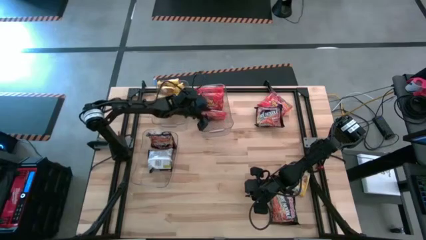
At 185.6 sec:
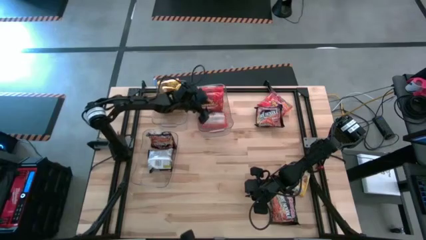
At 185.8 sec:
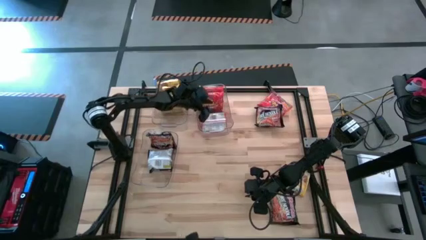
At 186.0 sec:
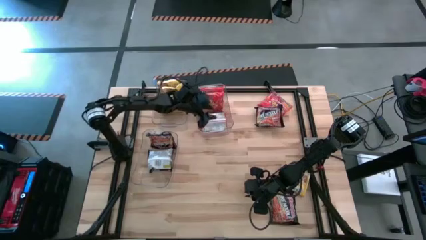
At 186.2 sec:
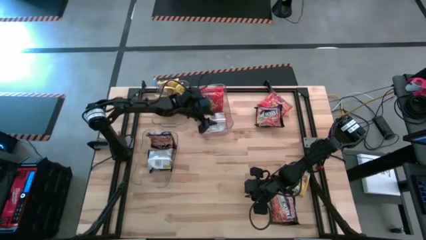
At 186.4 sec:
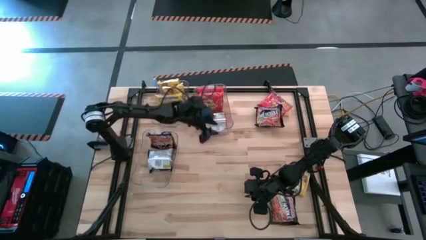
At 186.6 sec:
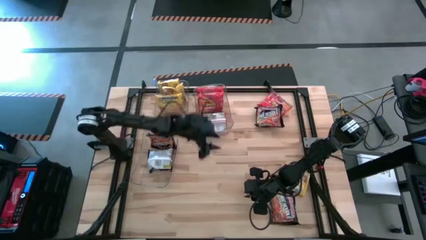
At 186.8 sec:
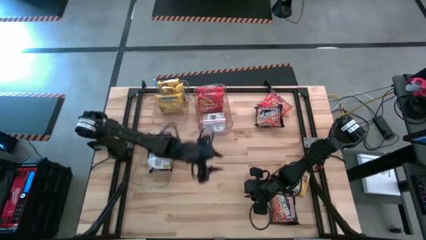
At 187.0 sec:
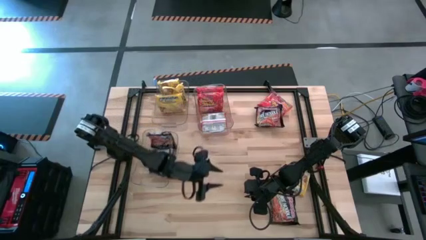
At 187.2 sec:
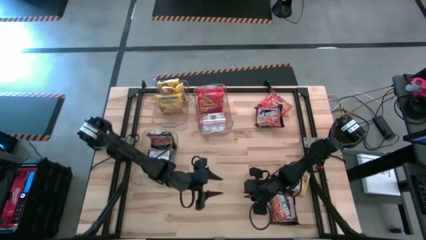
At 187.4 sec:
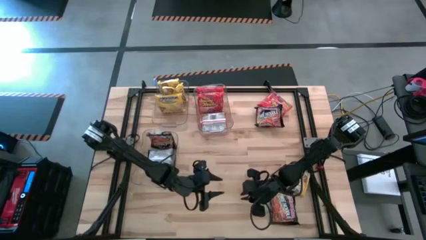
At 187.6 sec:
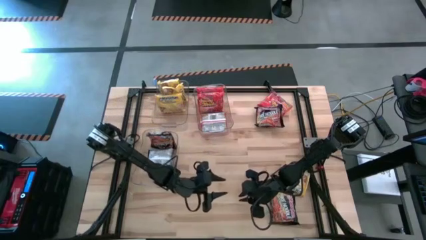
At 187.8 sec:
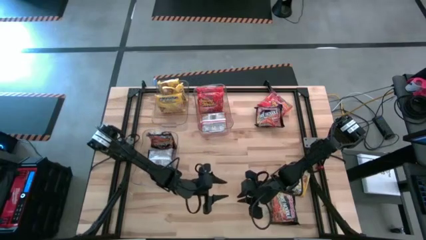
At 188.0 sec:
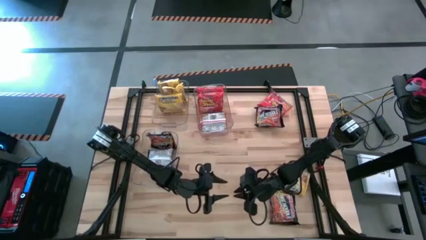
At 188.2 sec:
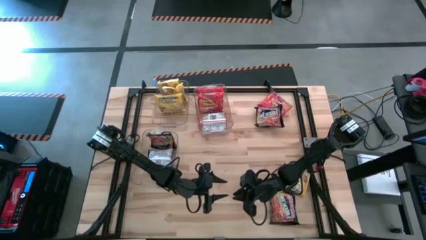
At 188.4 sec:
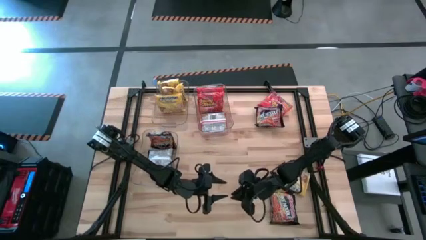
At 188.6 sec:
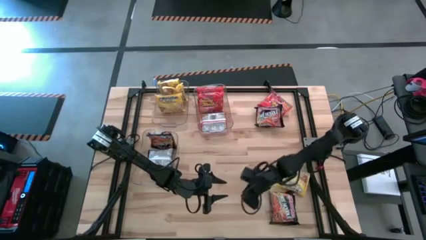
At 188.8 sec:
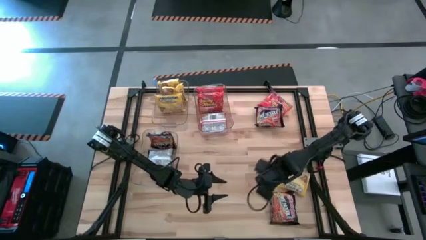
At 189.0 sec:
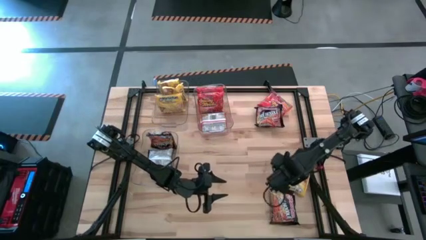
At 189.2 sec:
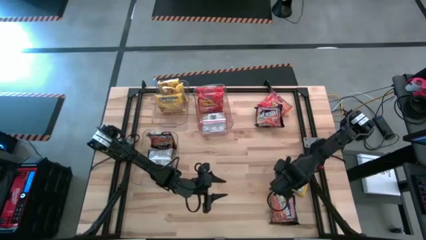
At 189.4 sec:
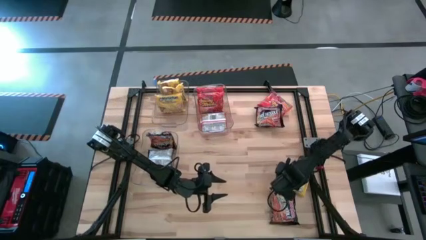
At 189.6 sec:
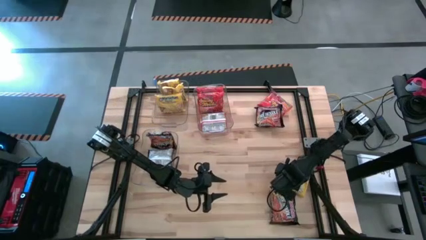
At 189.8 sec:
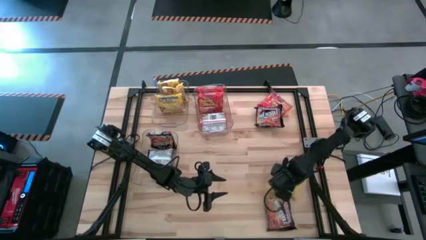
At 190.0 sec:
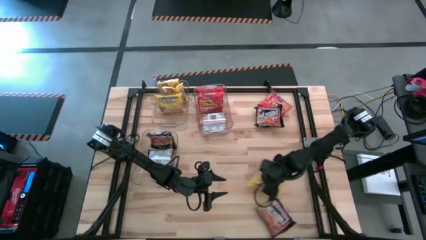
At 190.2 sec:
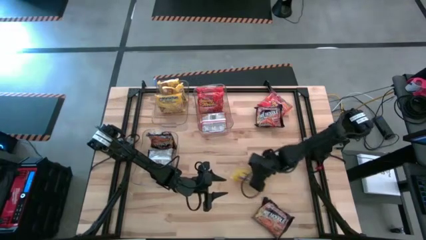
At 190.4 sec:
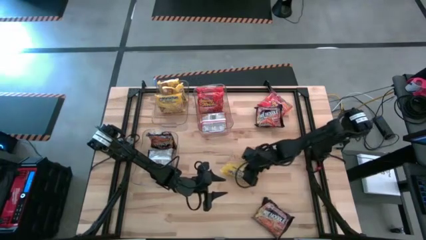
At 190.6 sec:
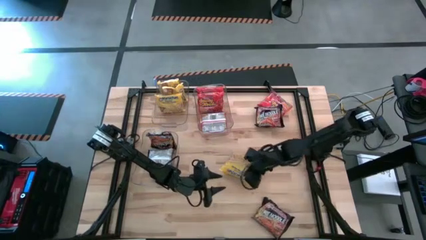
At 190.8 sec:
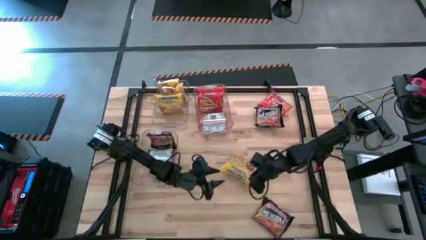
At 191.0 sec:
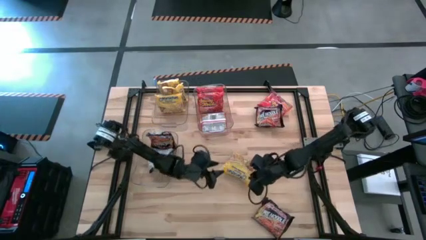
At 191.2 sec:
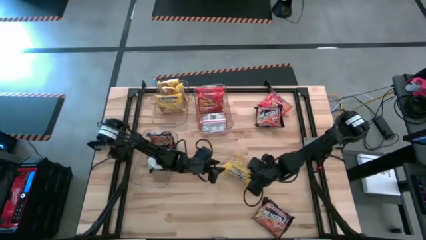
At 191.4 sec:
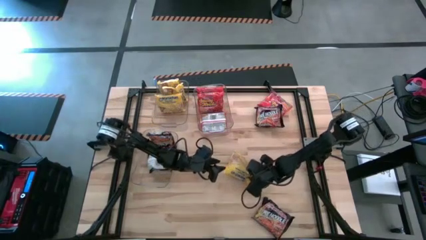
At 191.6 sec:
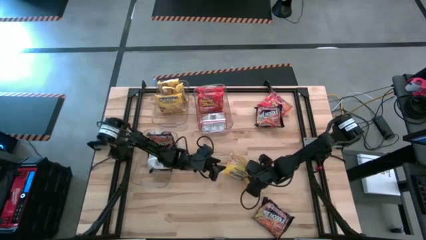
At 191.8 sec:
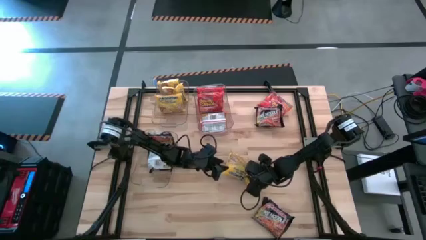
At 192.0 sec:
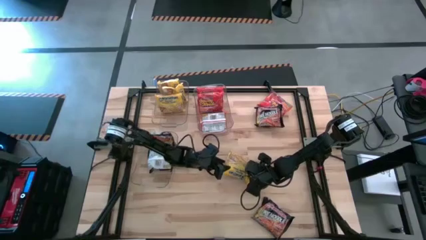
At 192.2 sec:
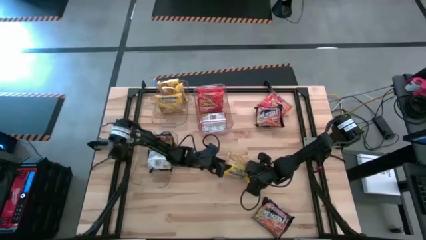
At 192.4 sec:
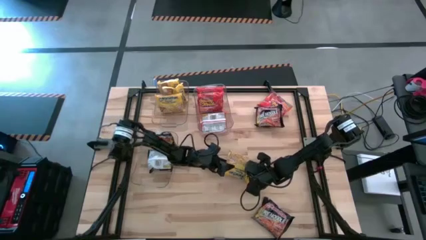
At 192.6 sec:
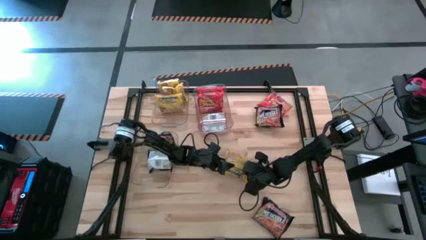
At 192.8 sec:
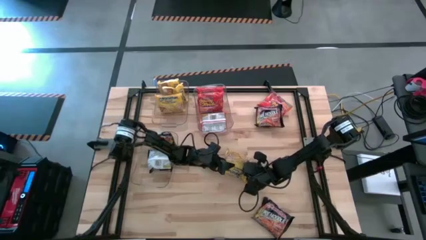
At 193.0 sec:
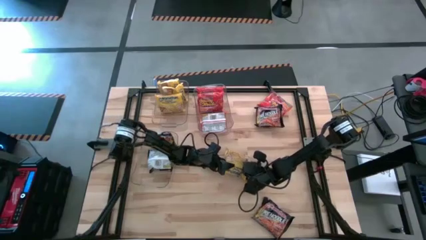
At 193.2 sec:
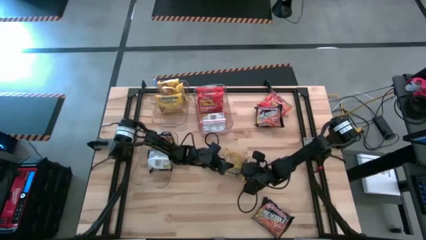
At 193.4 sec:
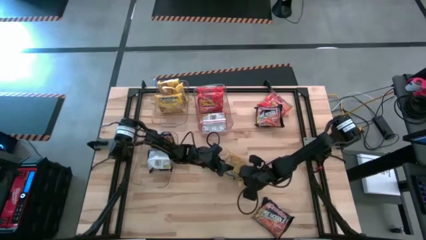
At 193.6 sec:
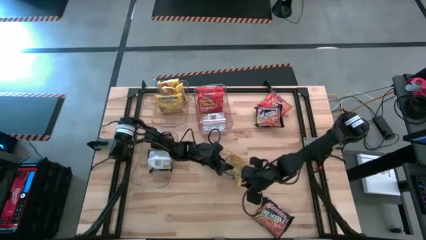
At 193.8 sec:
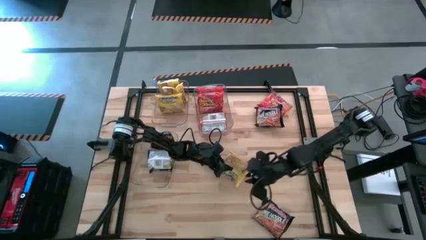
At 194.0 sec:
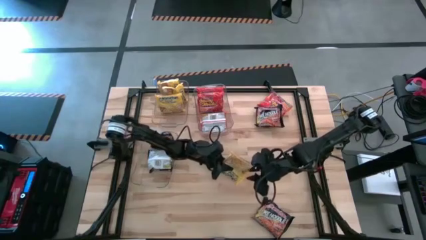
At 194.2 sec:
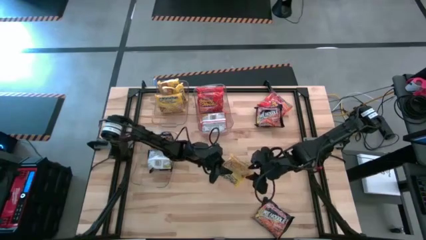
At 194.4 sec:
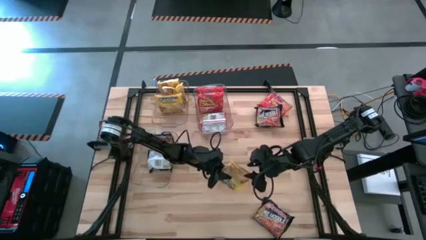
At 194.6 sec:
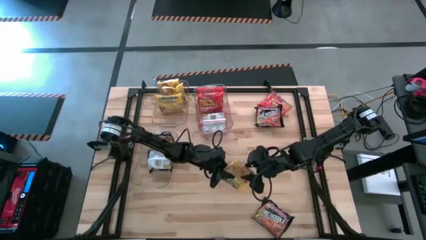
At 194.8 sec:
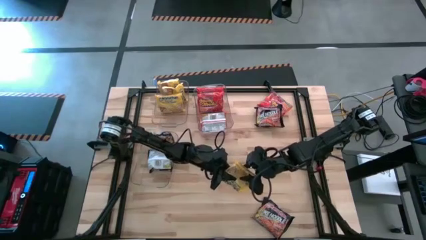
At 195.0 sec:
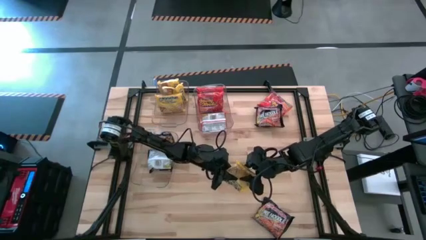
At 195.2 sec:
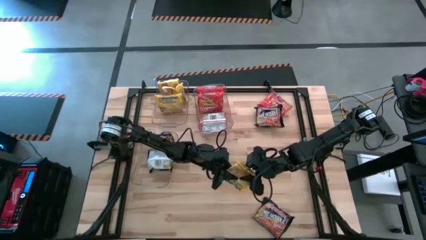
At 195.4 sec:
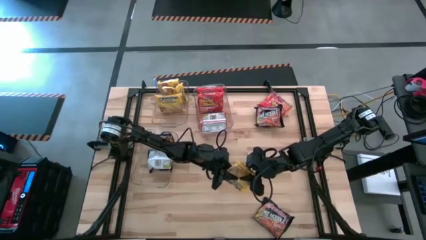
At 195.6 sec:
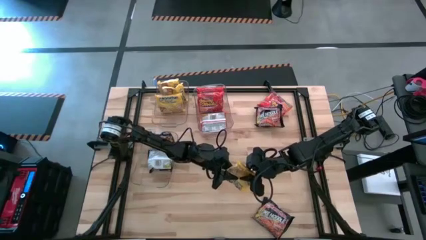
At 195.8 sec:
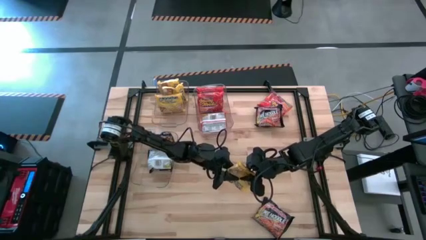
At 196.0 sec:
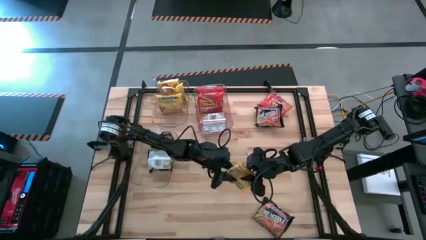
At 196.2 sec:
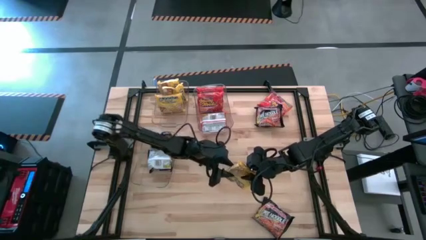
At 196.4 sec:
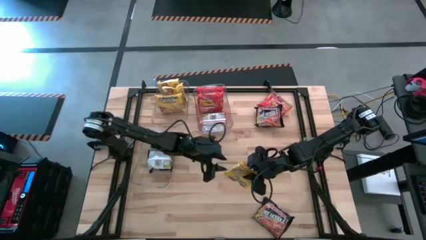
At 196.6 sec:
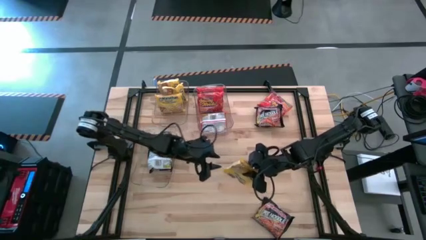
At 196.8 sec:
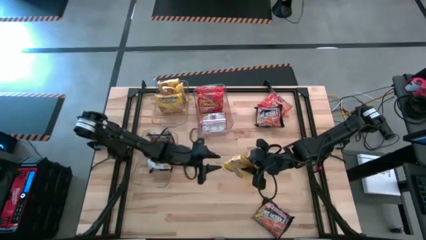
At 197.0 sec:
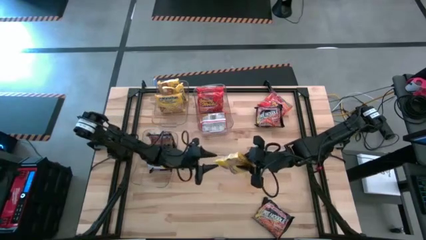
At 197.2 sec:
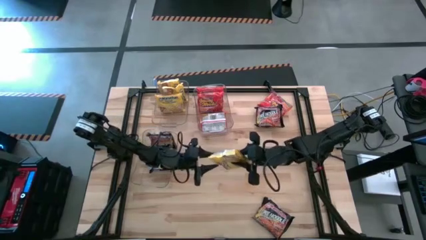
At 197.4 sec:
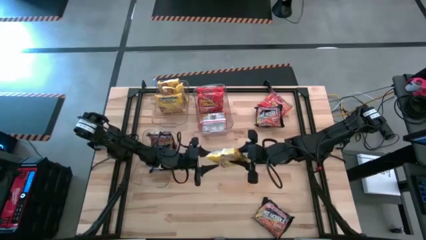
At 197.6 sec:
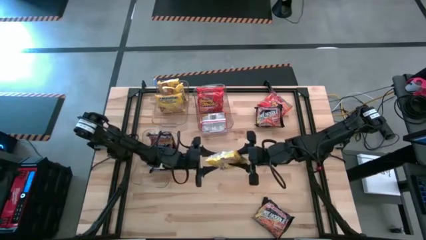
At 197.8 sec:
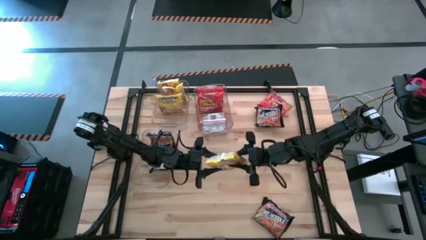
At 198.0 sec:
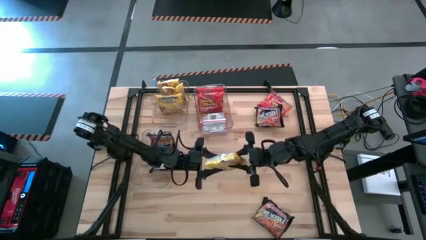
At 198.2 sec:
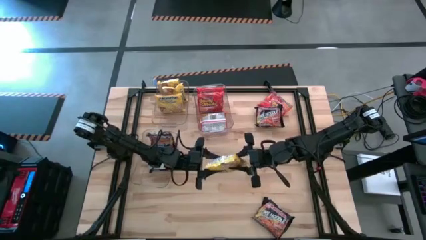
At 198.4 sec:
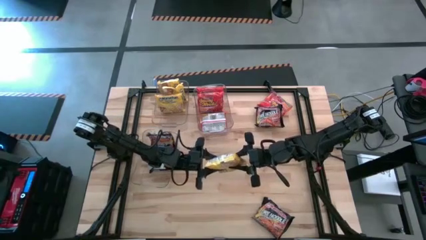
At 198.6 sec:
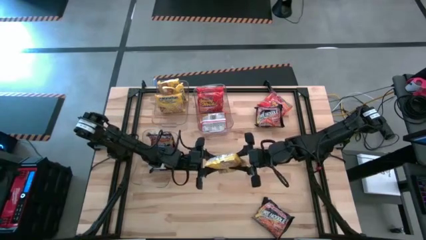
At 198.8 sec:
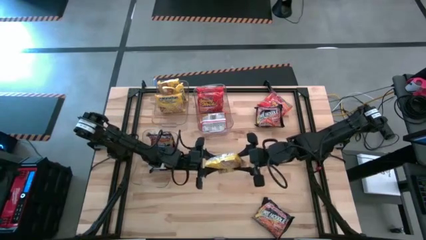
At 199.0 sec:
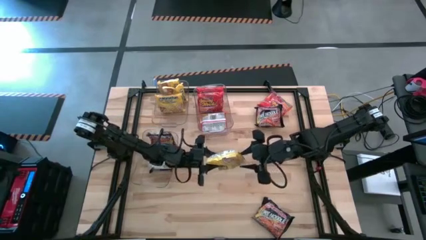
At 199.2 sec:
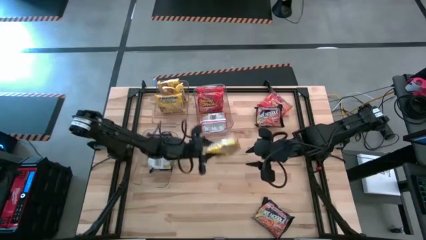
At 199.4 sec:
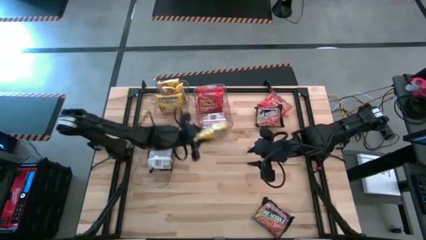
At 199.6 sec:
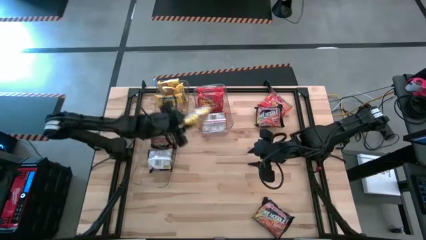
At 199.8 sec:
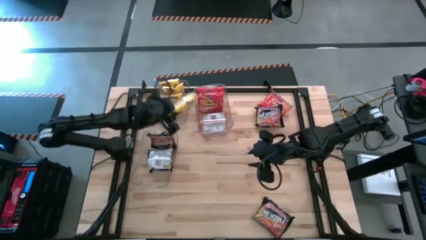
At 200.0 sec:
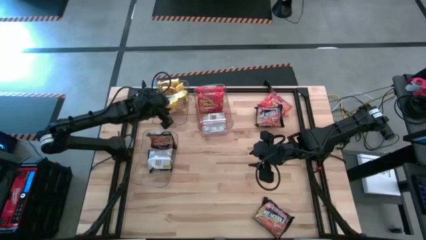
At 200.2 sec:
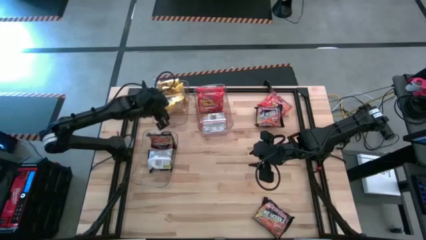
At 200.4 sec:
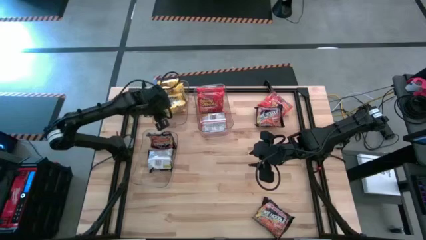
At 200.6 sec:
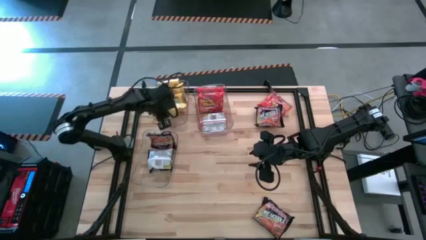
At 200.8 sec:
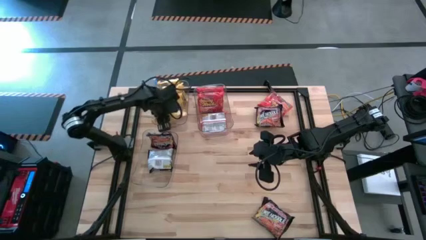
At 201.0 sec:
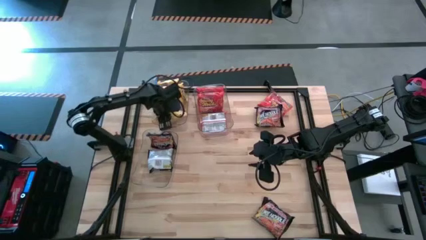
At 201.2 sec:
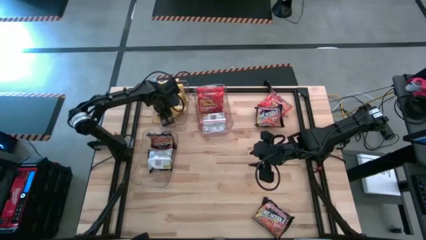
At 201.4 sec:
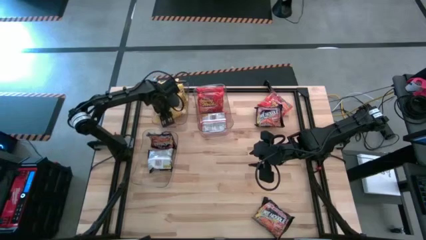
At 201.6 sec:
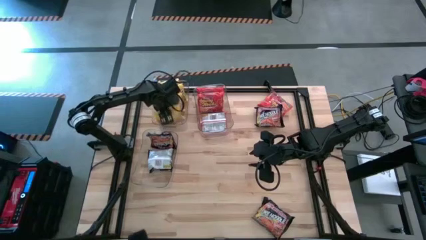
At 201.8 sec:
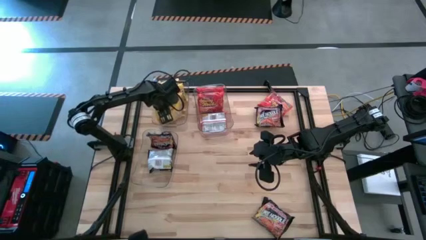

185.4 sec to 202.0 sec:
Task: Sort Maruchan noodles
Put the yellow noodle pack into the top left transparent bin
